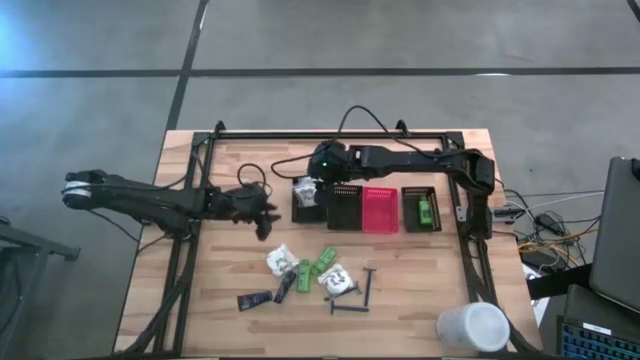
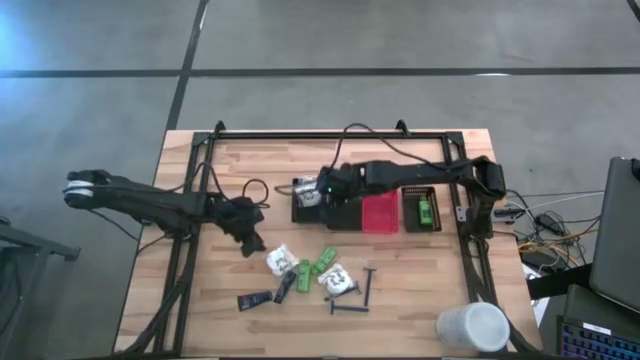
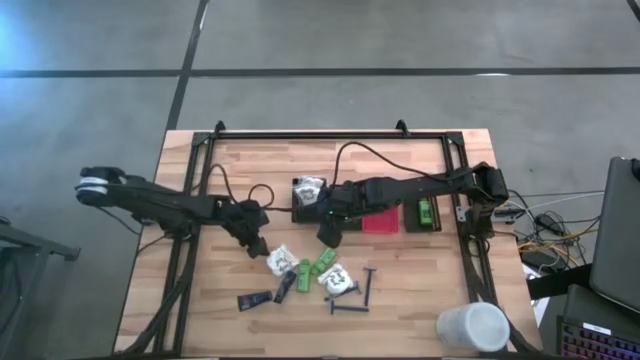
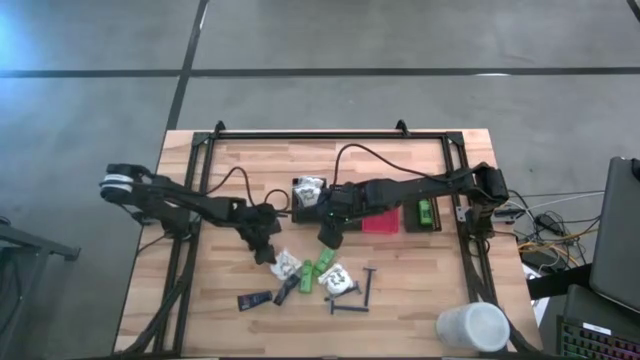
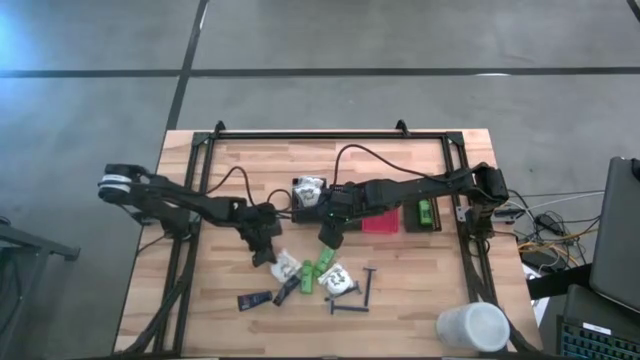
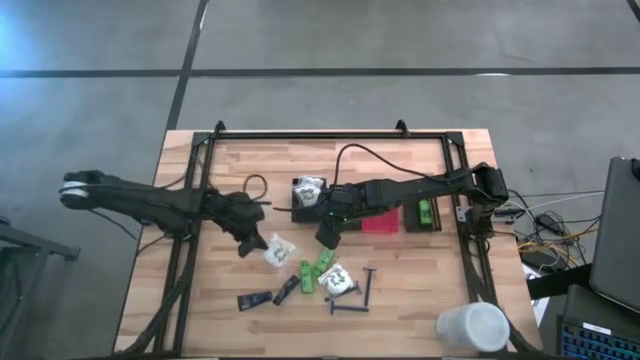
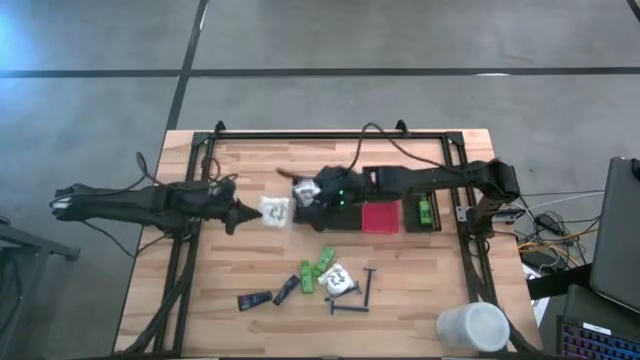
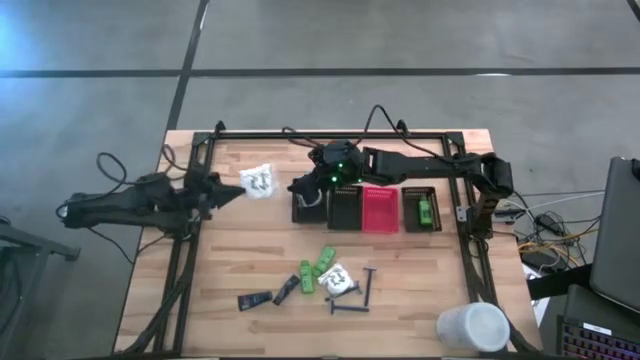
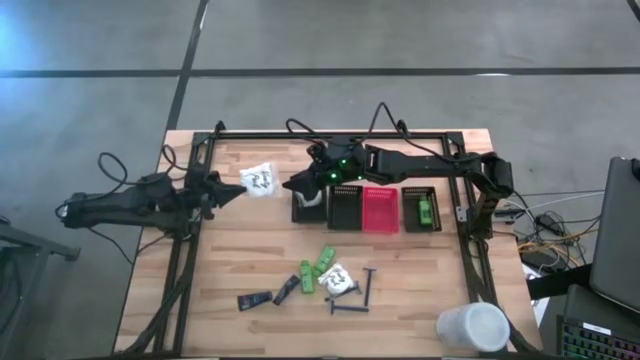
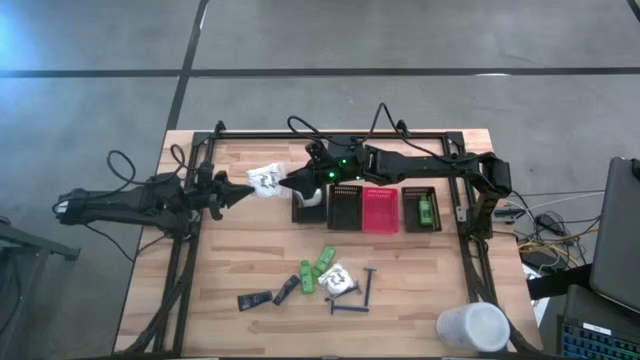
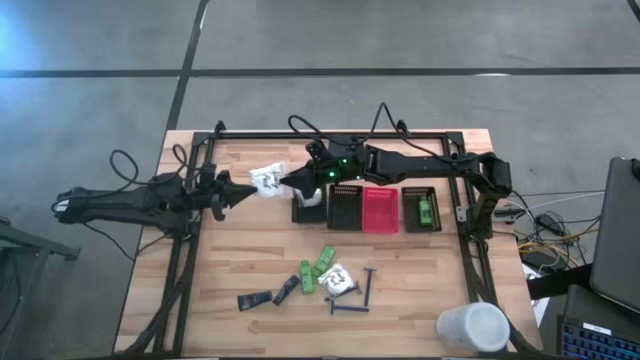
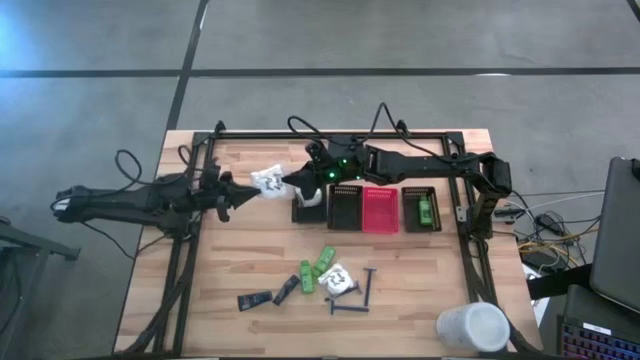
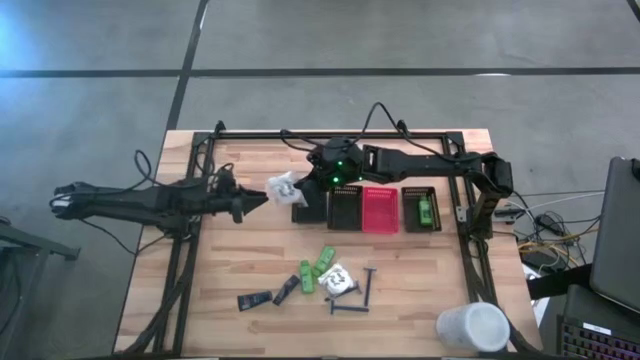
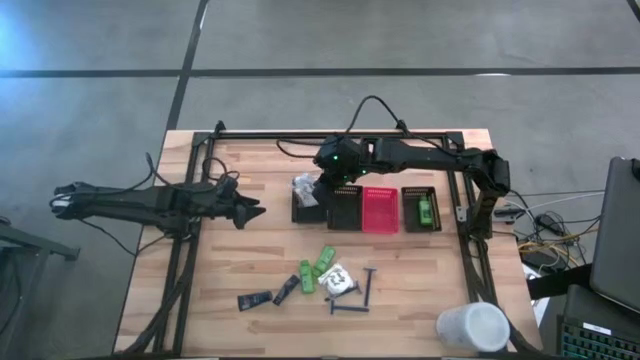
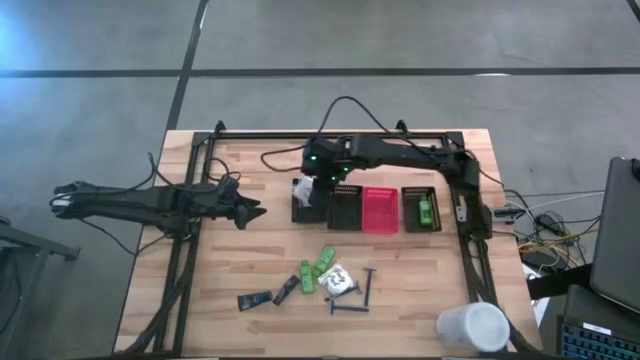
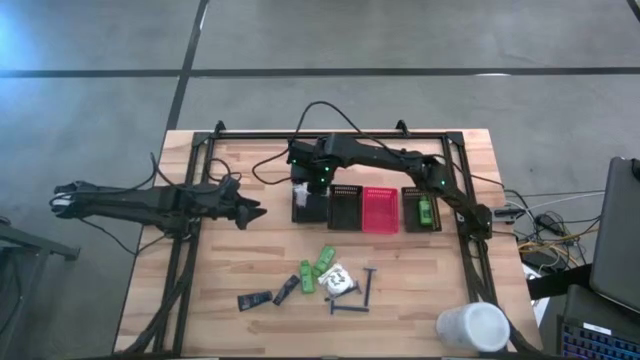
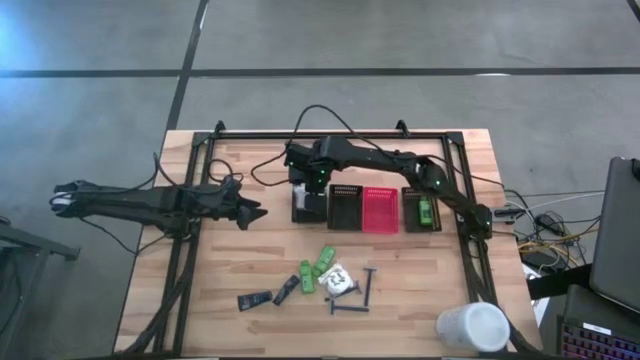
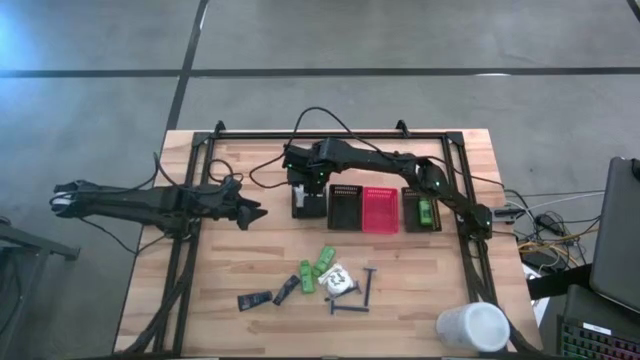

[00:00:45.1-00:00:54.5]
Task: Pick & Place Travel size toiletries
Put the white cotton pack into the left black bin

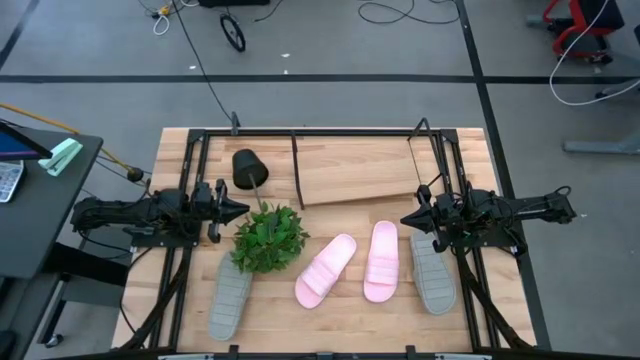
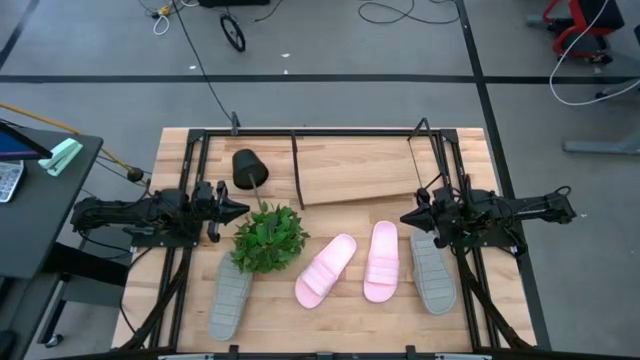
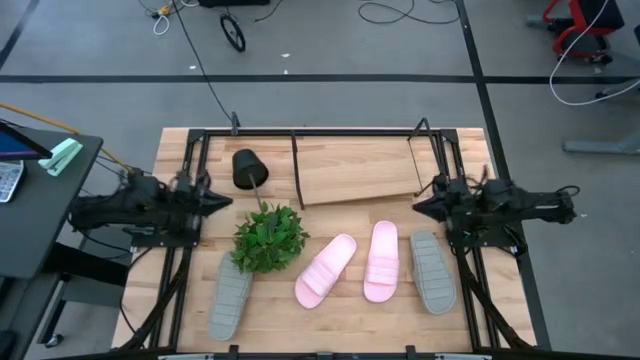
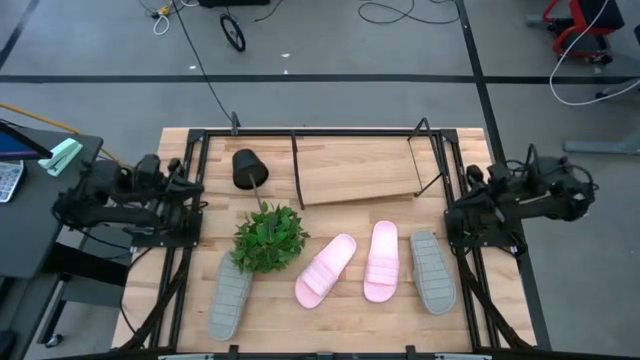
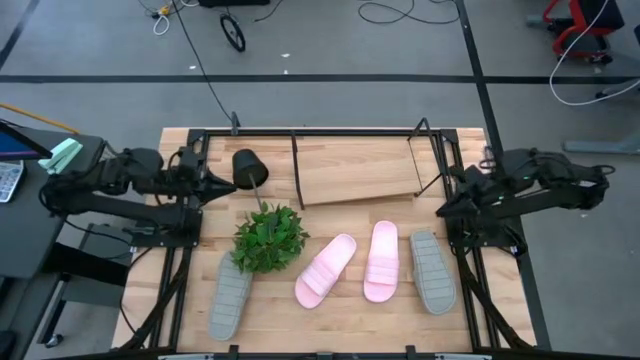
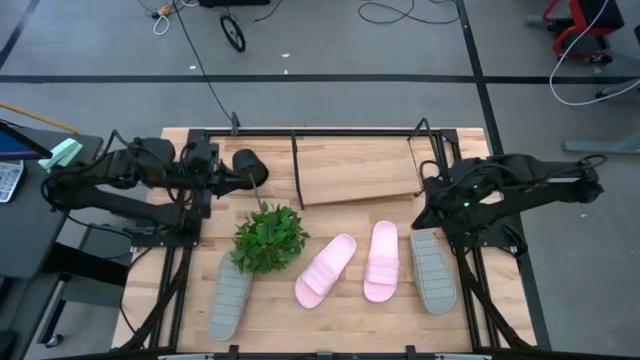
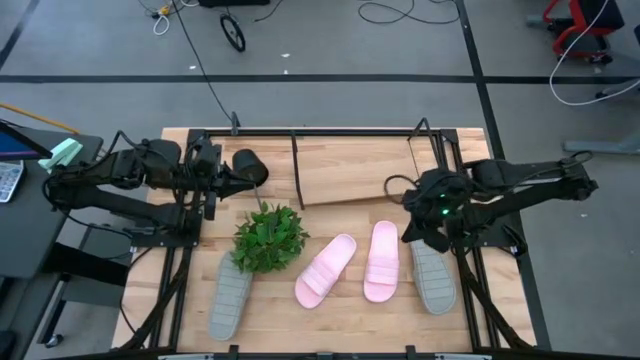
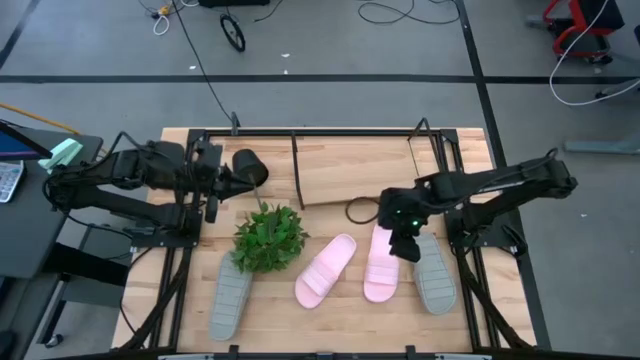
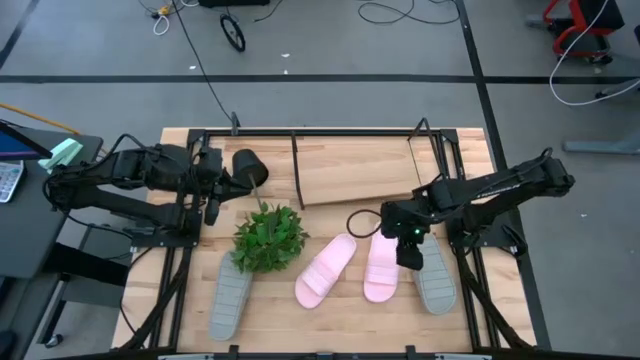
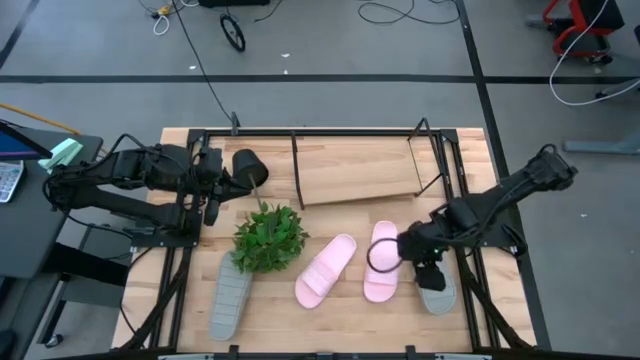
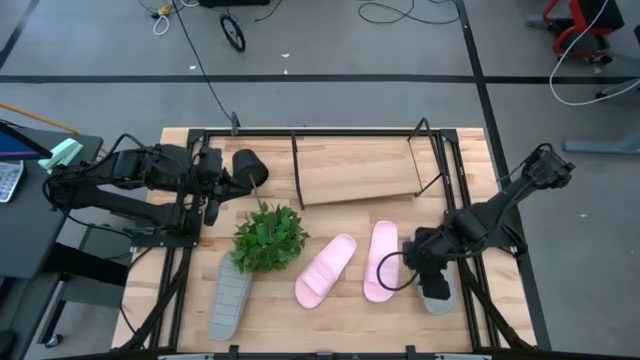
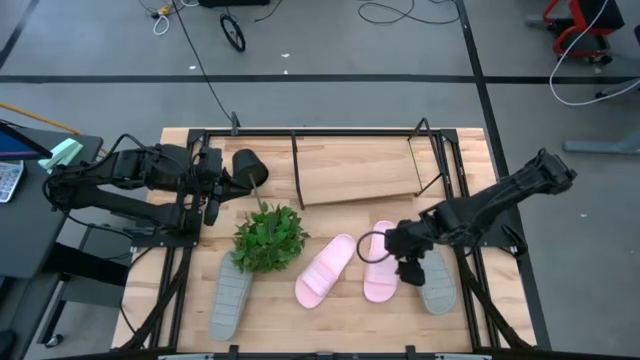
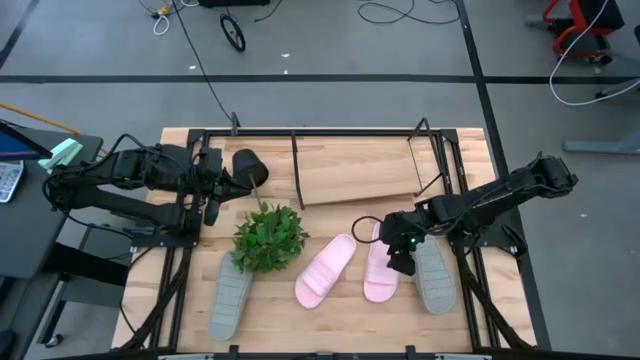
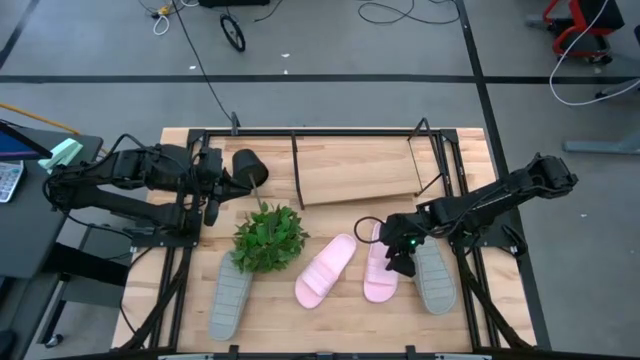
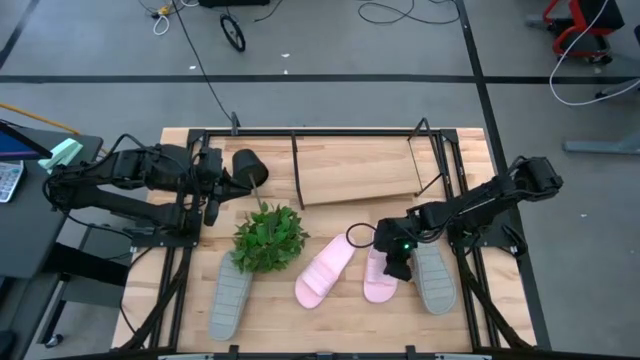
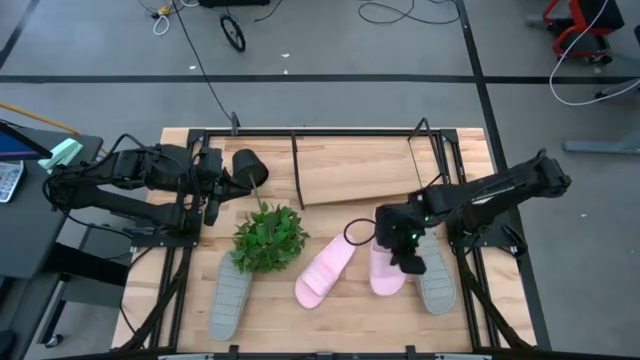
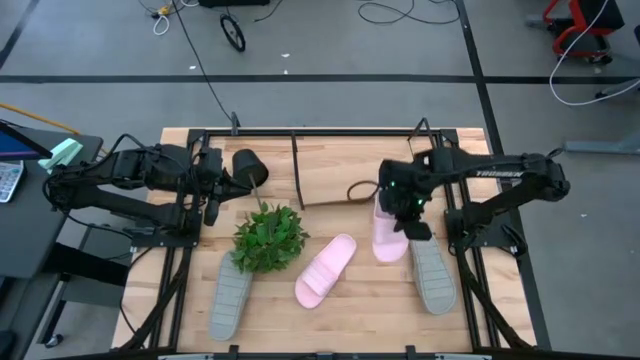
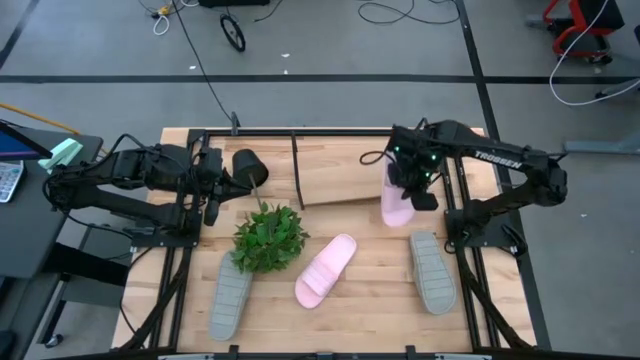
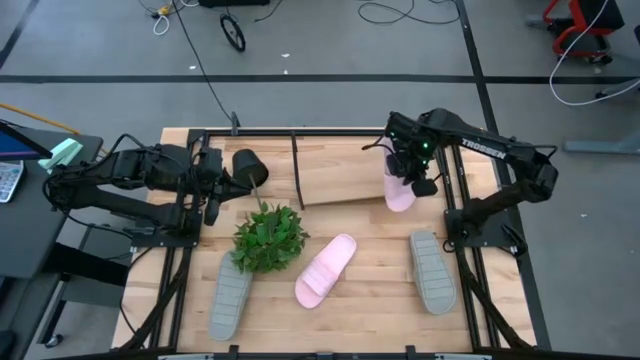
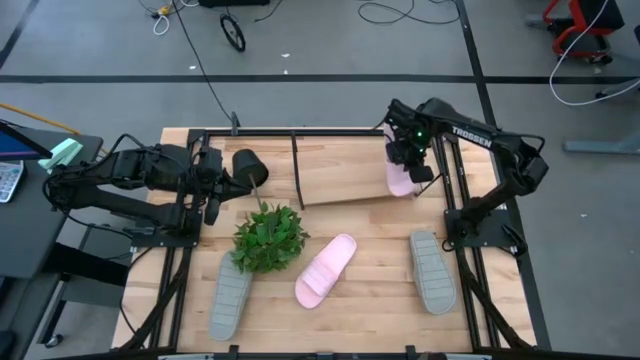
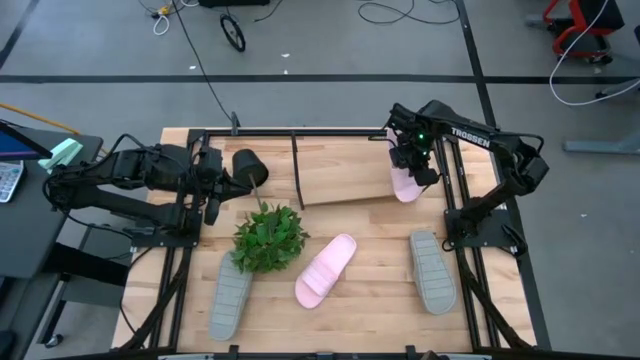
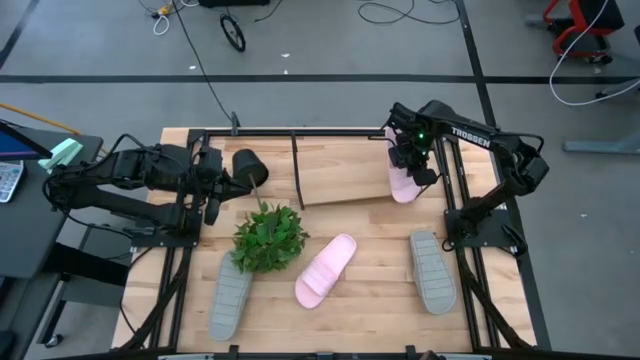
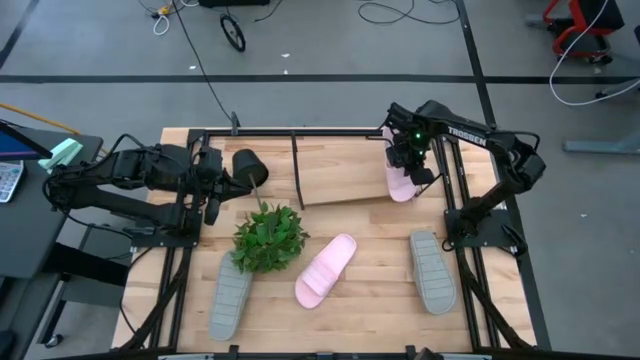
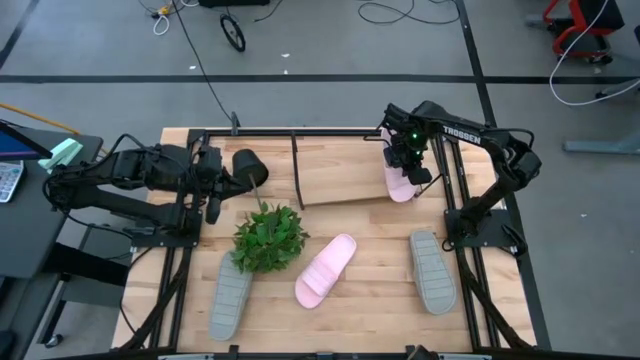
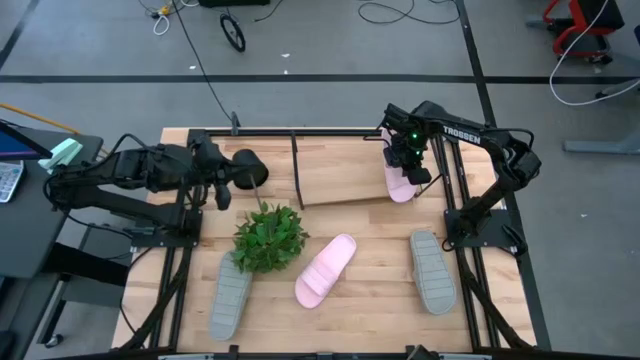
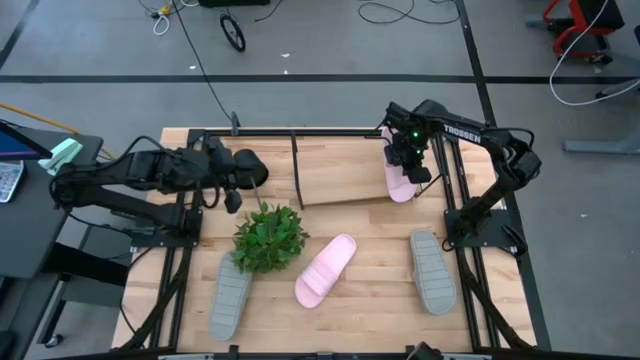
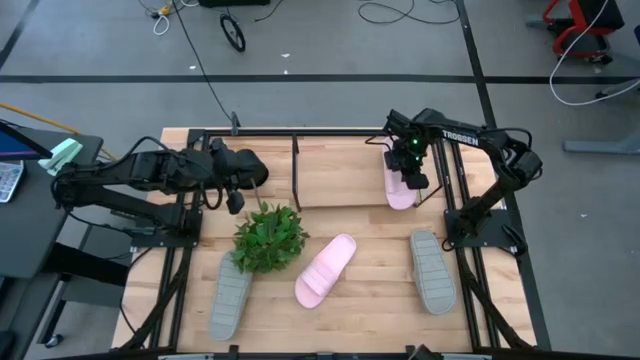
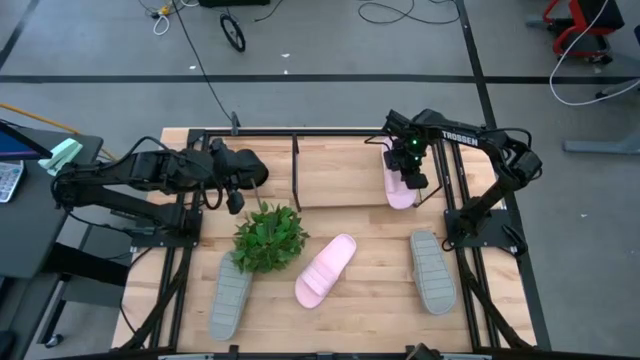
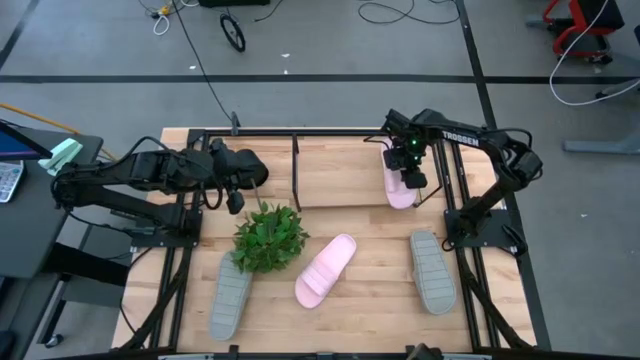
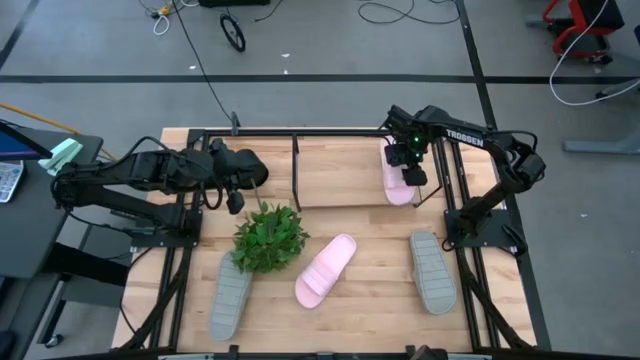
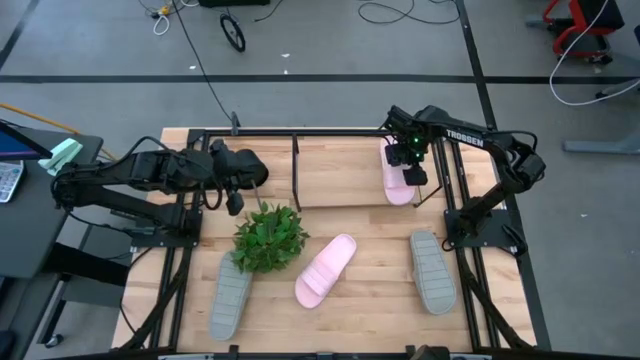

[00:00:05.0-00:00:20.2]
Task: Pick and place slides into the shelf
Put the right pink slide on the shelf
